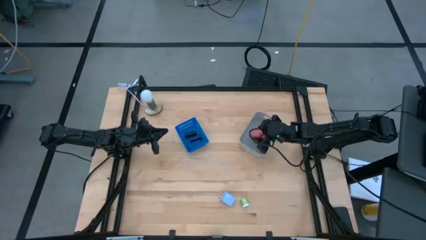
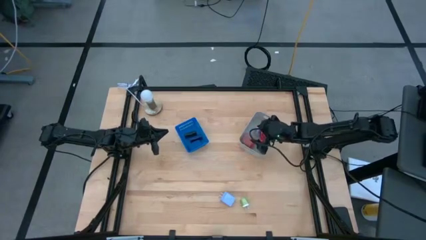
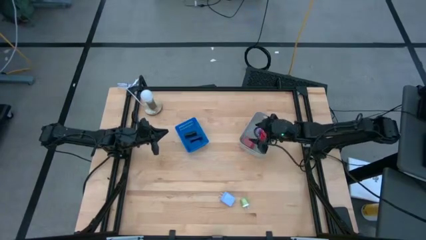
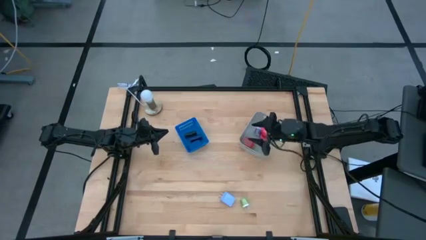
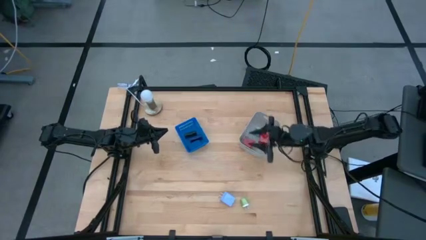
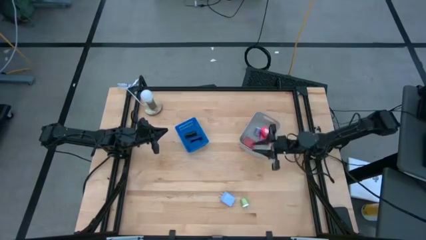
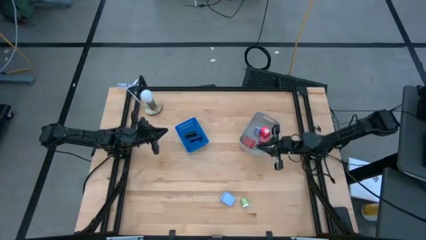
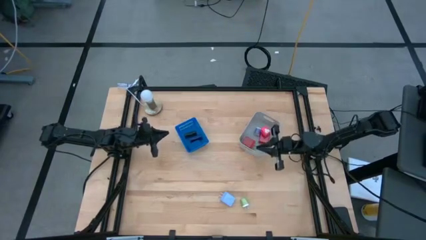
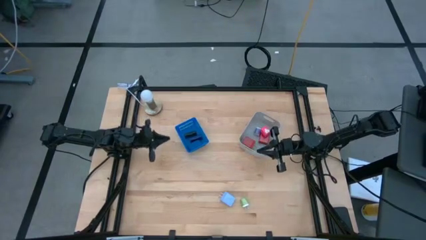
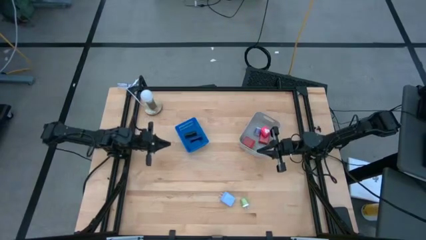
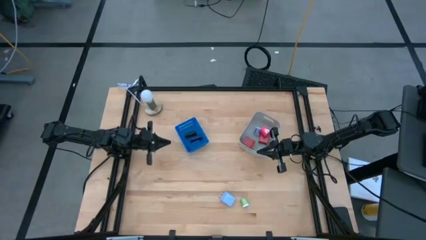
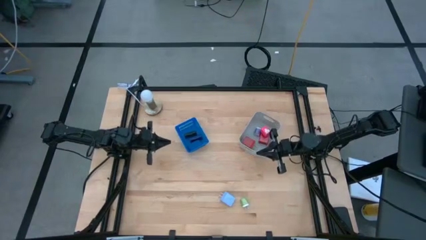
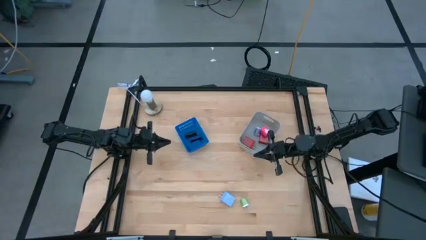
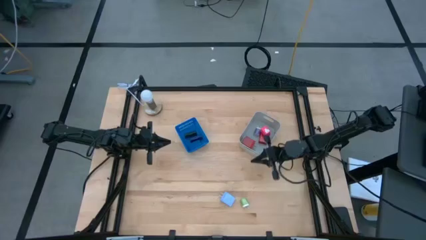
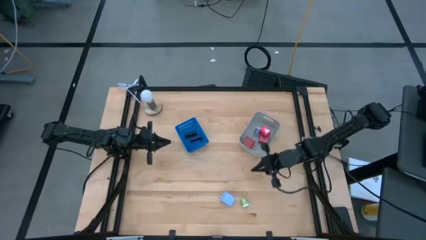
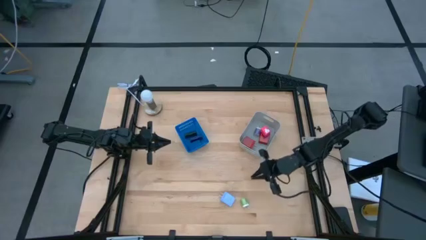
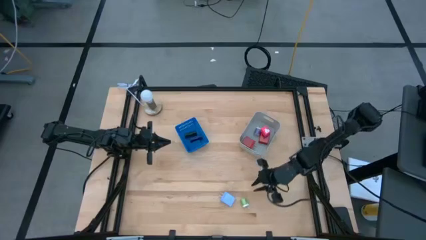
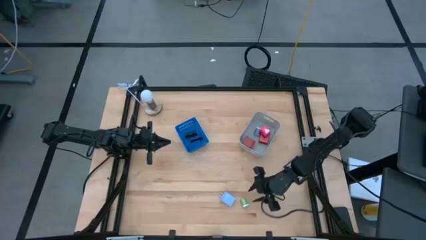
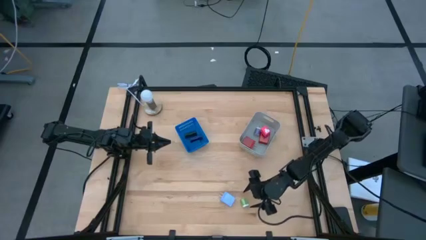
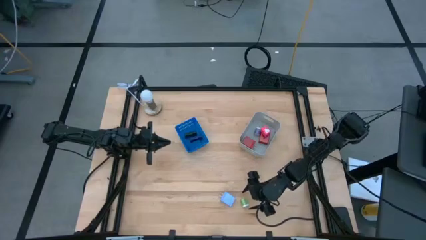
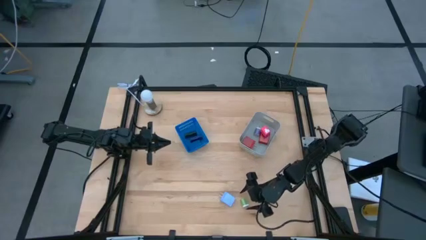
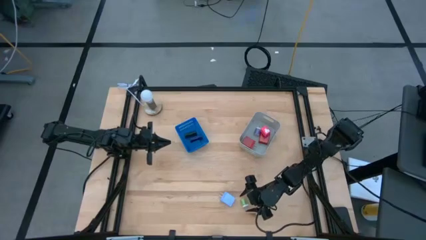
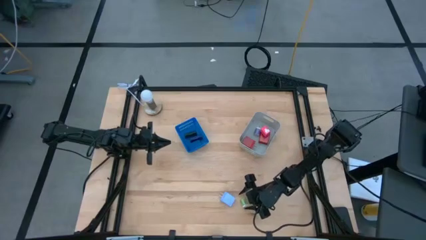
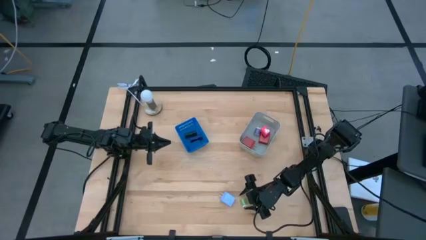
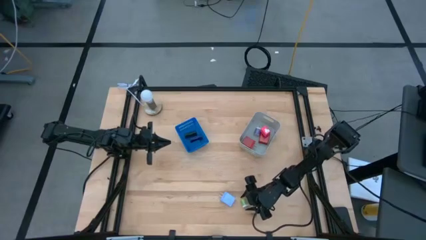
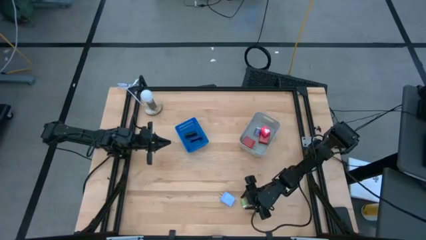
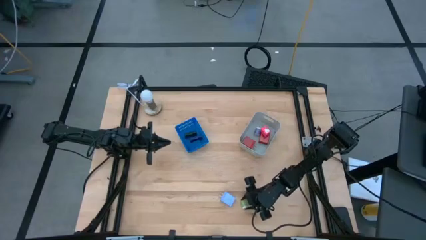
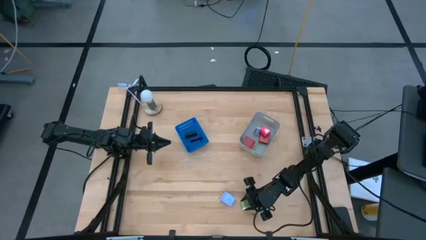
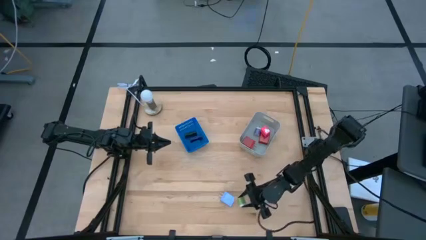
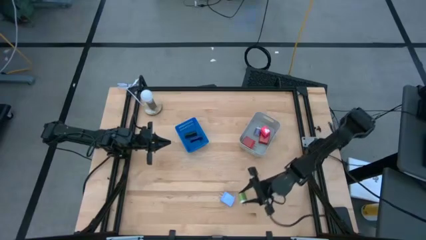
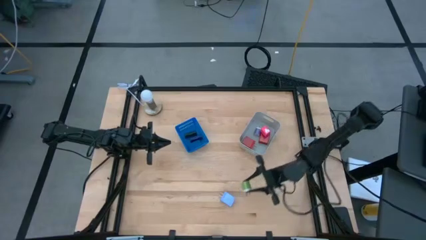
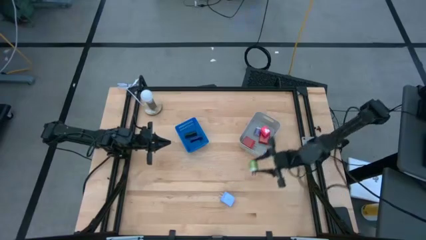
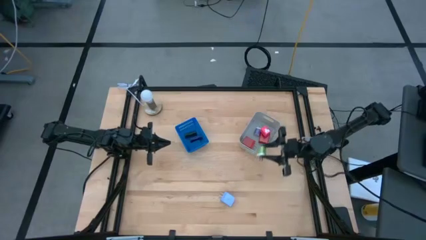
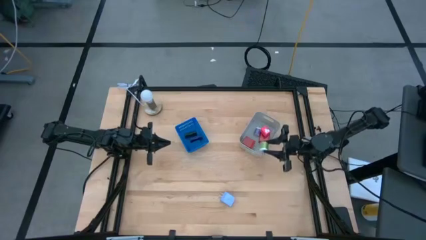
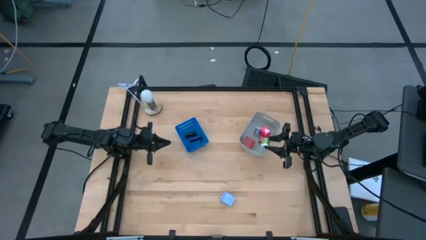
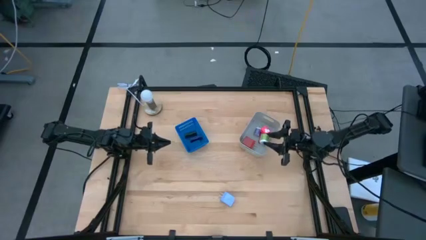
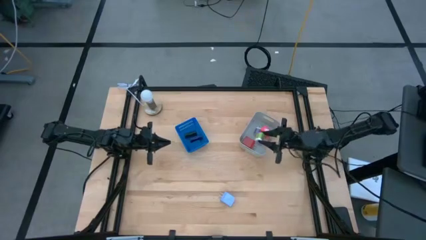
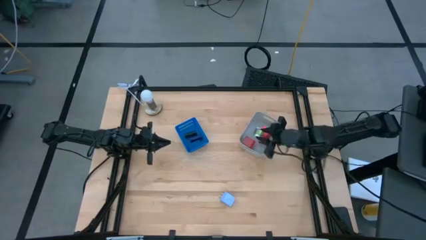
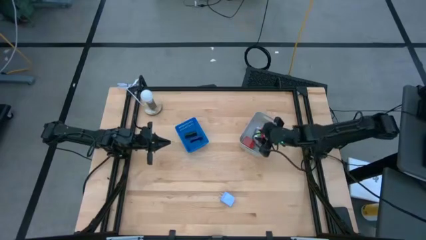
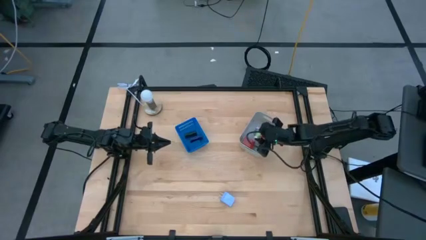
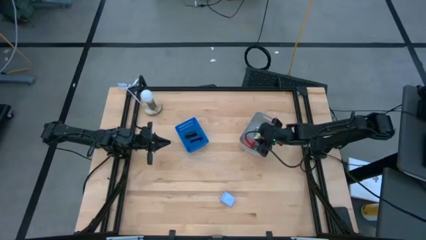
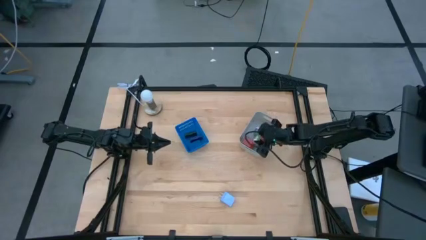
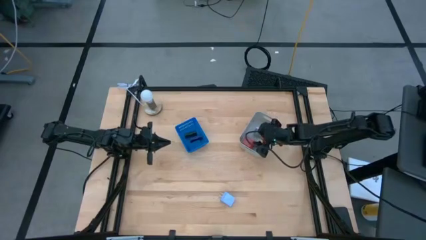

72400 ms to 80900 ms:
Task: Pick & Place Office items
Put the green charger adapter into the gray bin

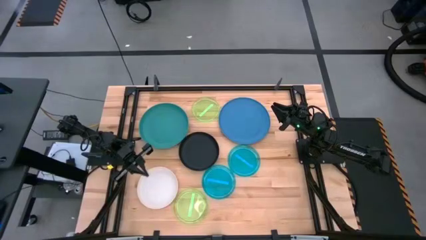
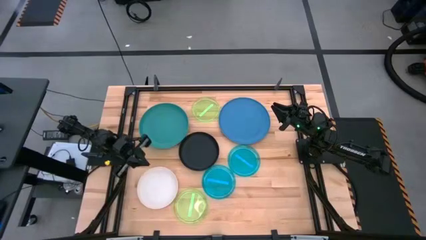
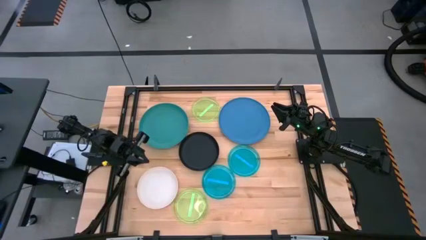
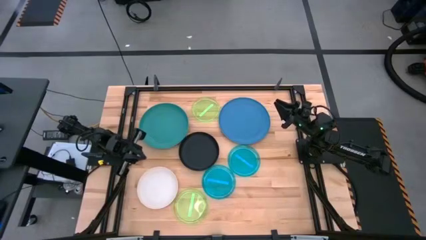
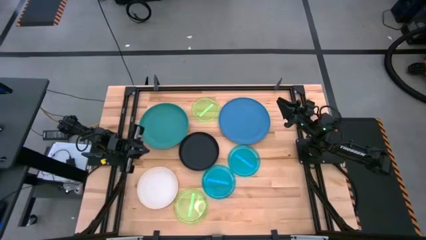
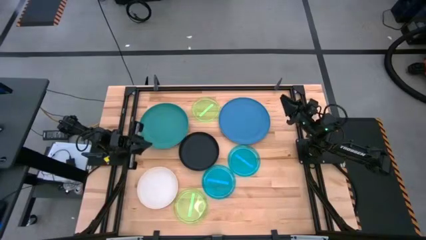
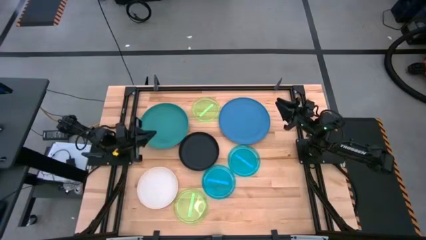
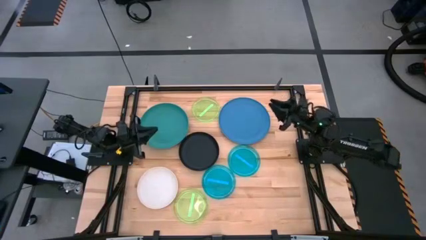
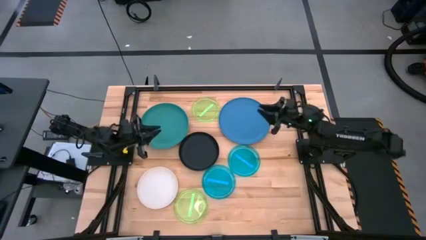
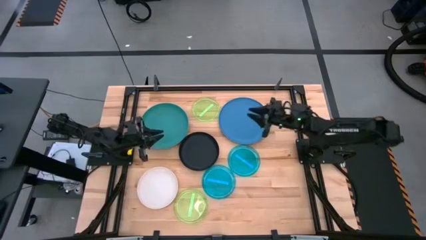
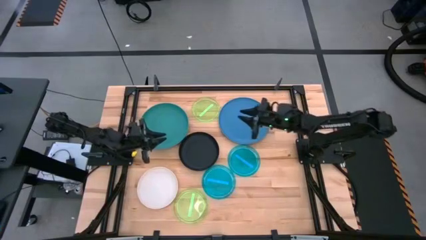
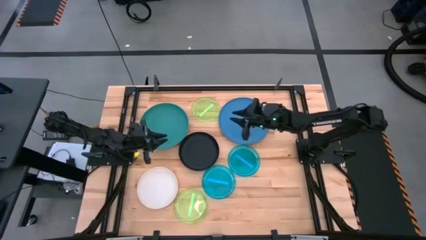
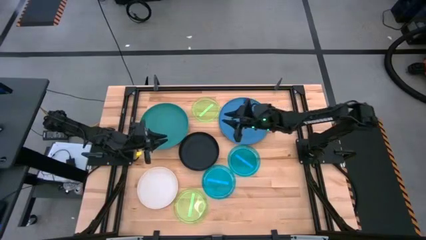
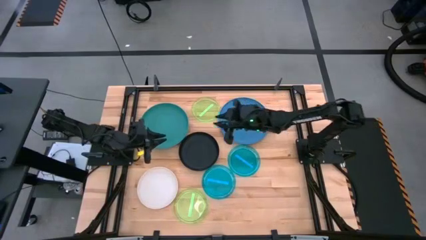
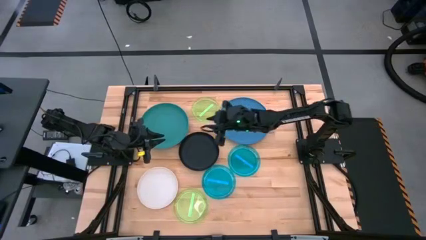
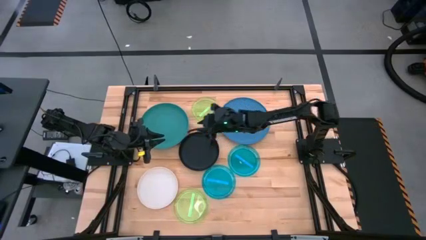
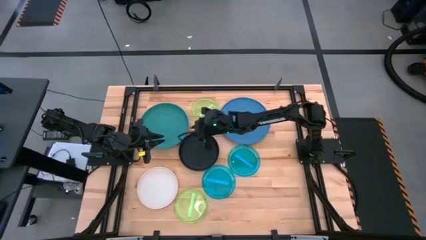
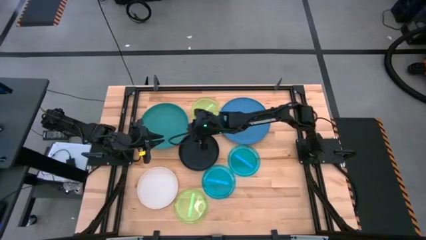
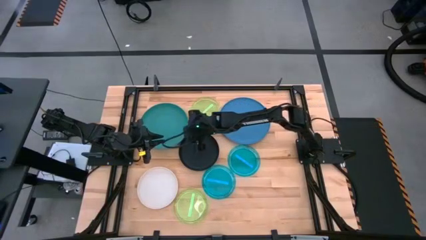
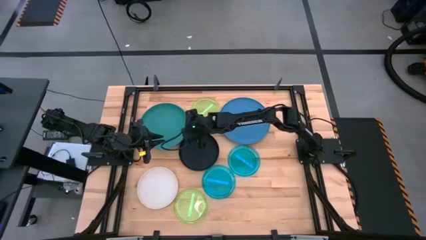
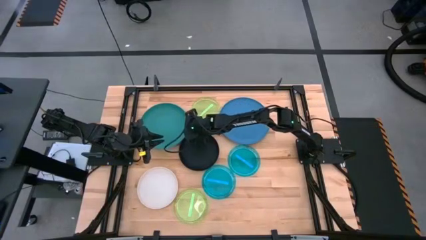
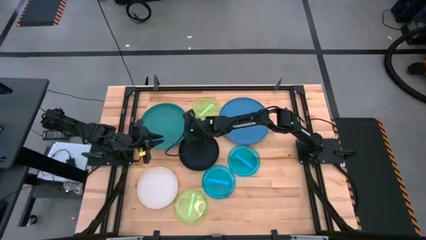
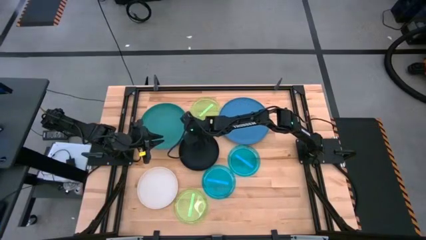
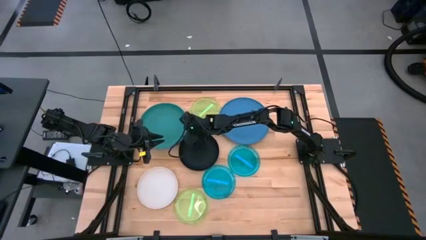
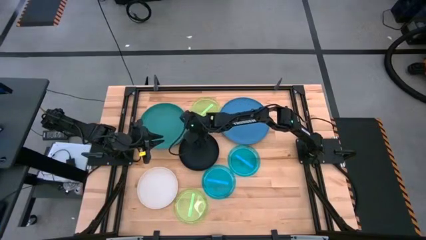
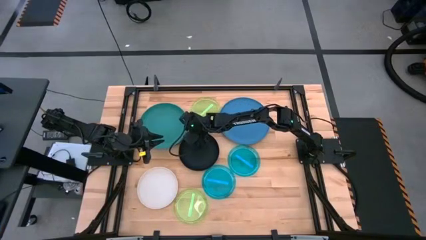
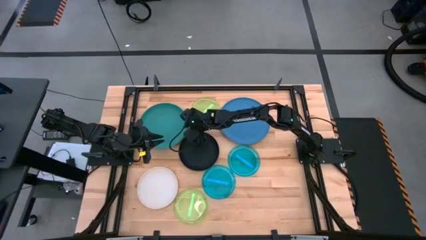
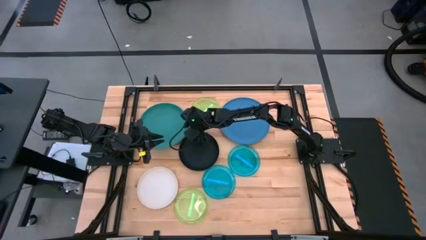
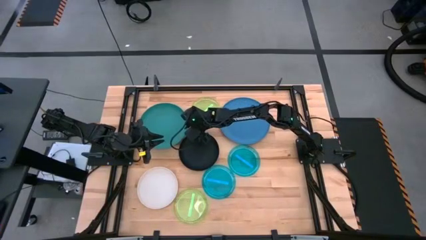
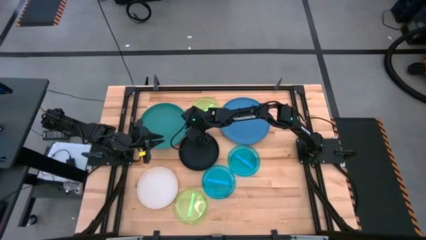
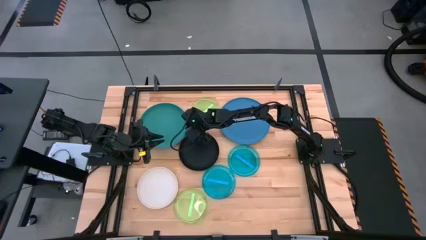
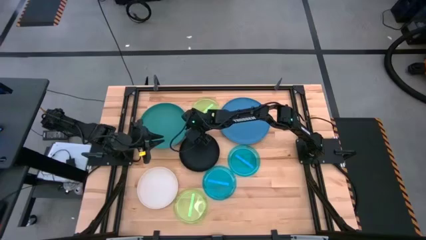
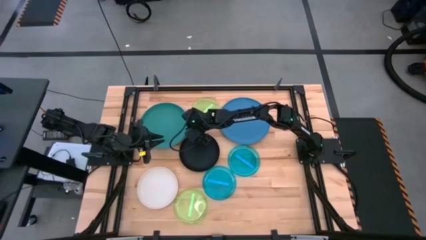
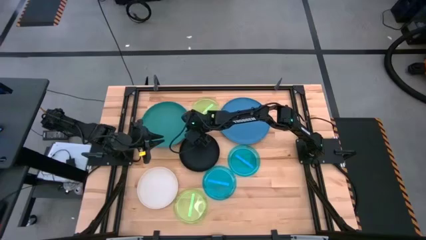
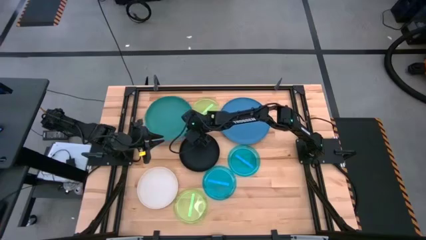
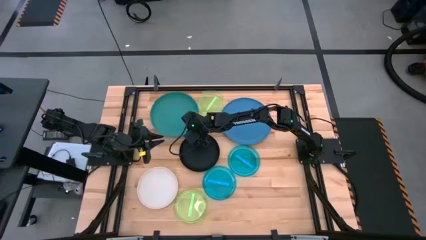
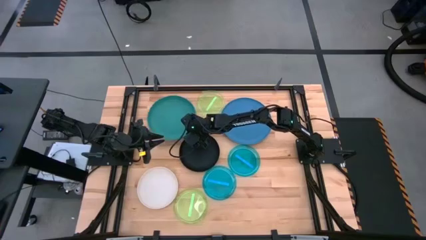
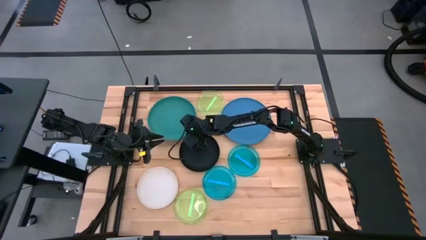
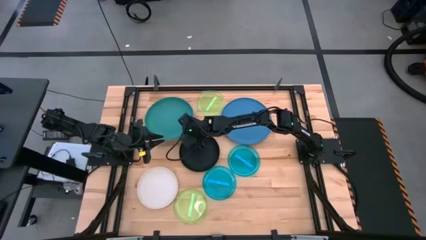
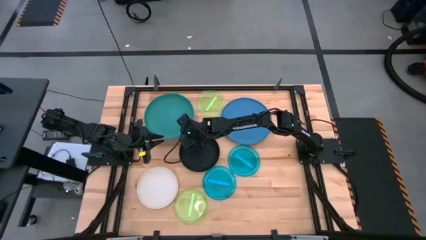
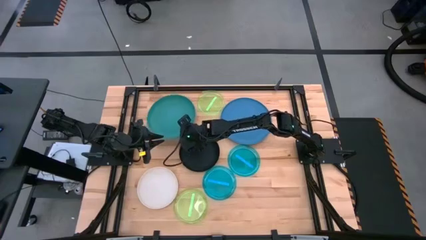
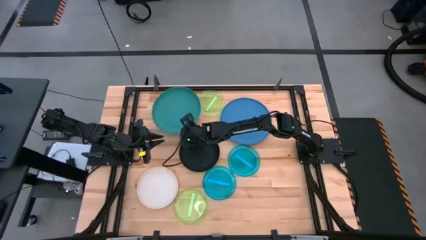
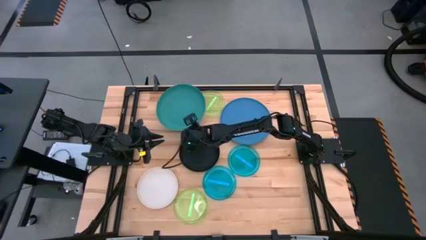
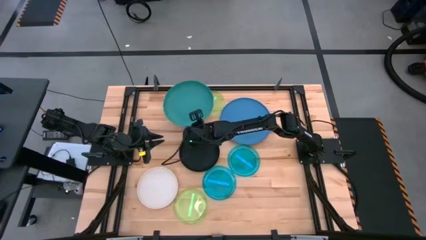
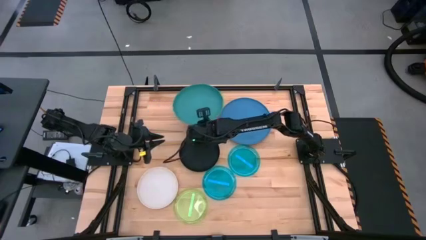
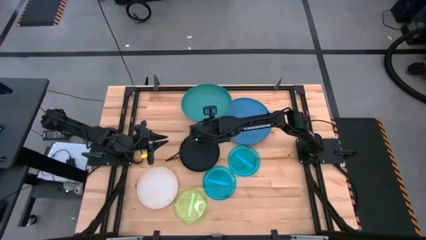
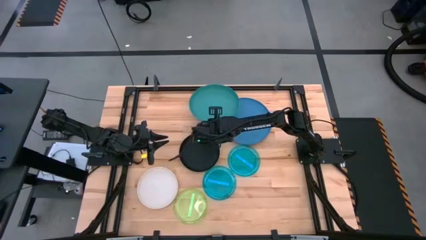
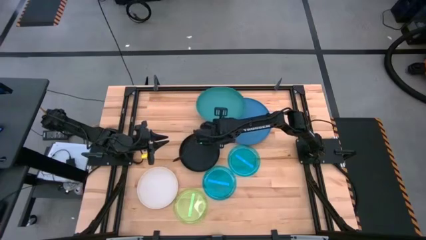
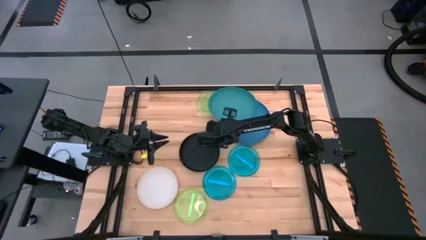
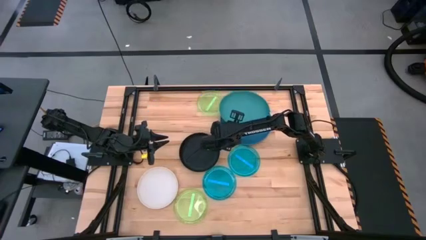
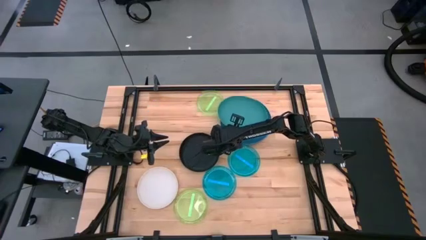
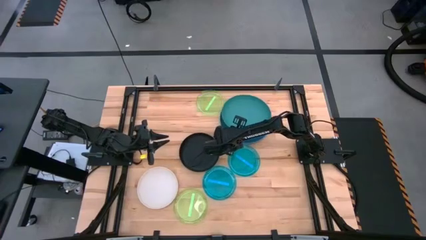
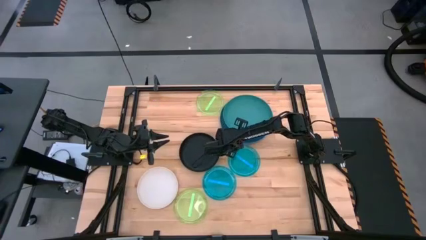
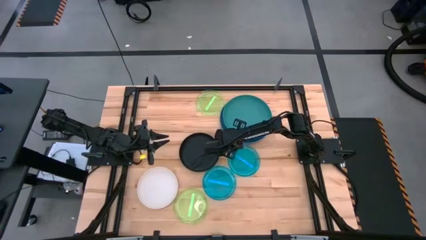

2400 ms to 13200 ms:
Task: Stack plastic plates
Stack the green plate on top of the blue plate
